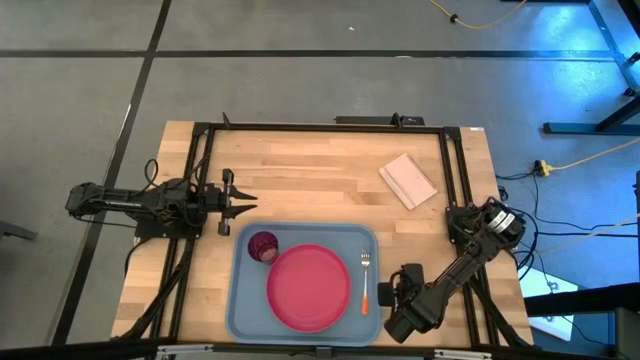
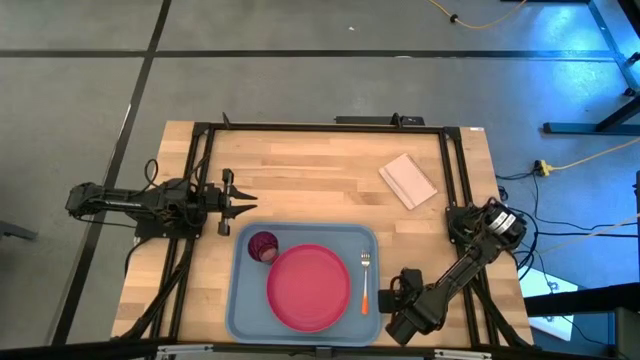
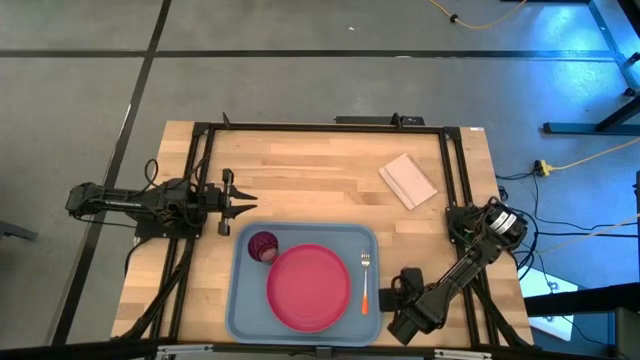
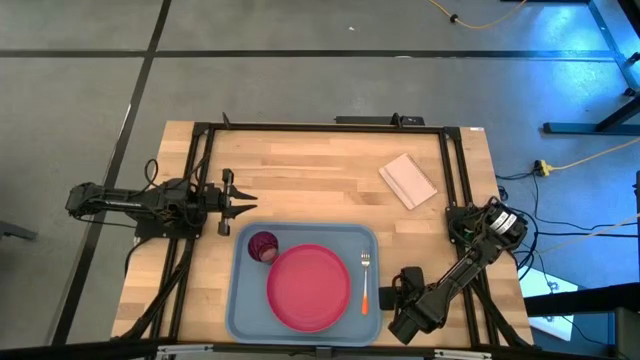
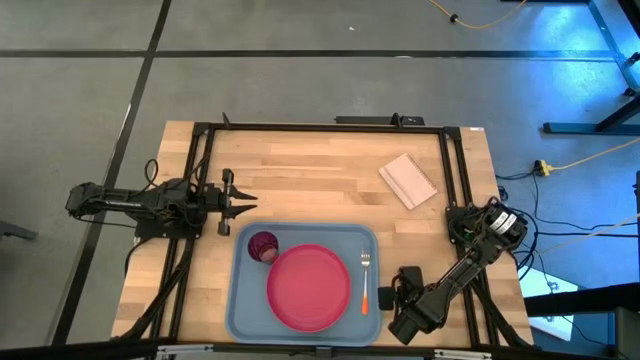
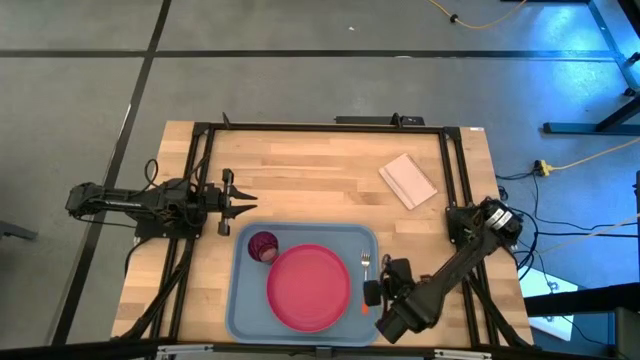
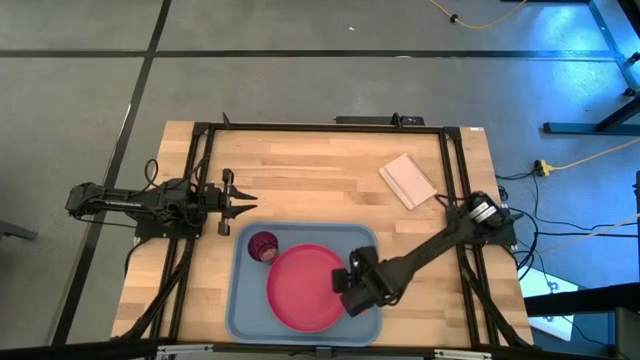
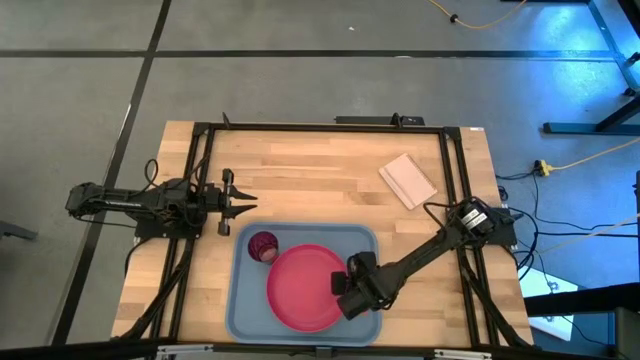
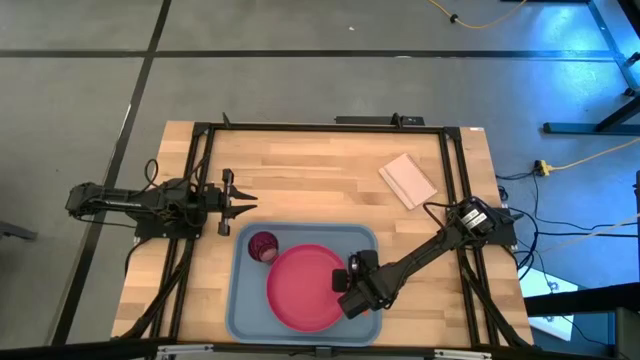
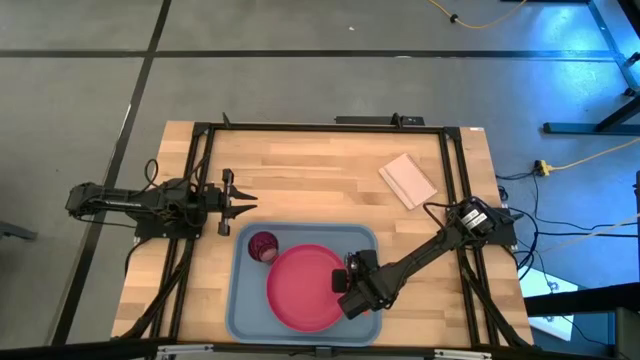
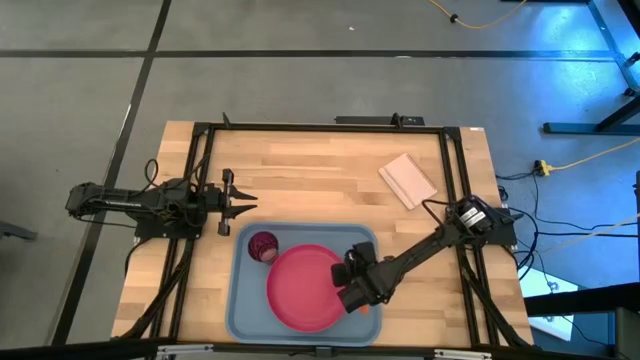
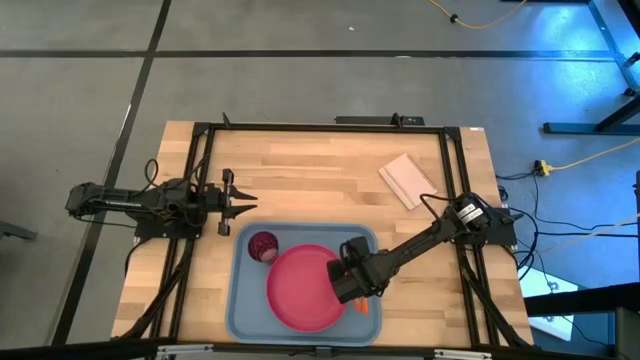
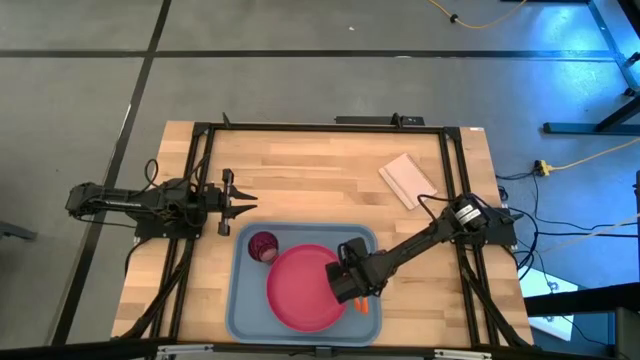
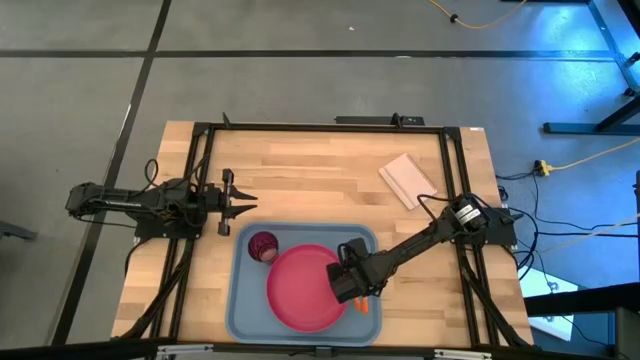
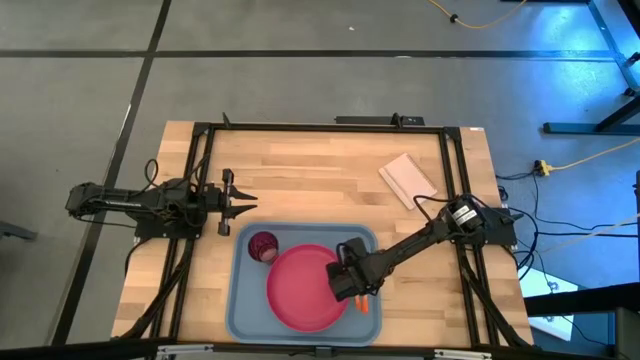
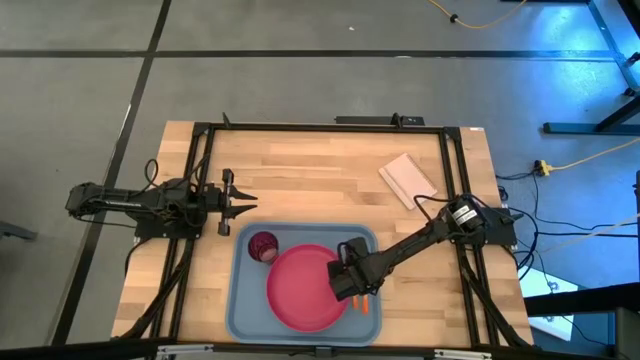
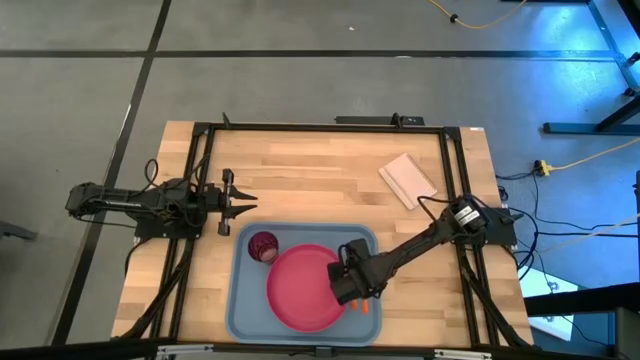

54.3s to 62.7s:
Task: Pick and place plate/cup/fork/spoon on tray
Put the orange spoon beside the pink plate on the blue tray

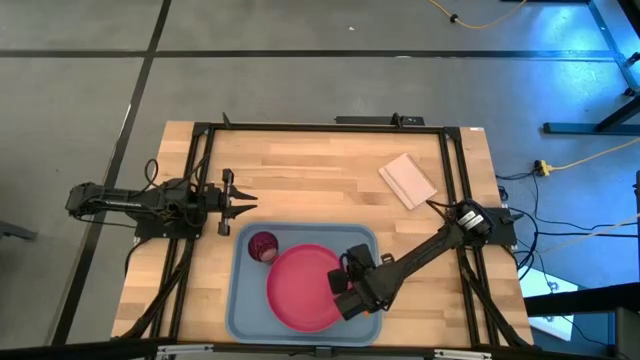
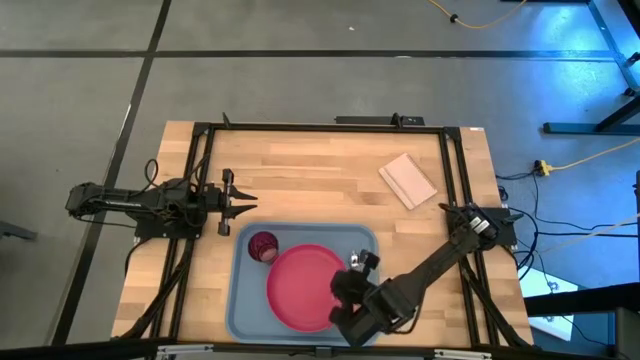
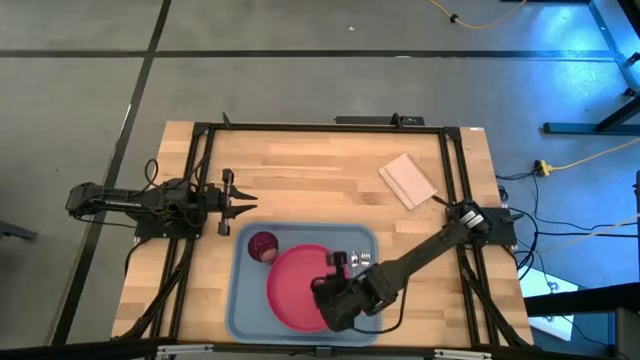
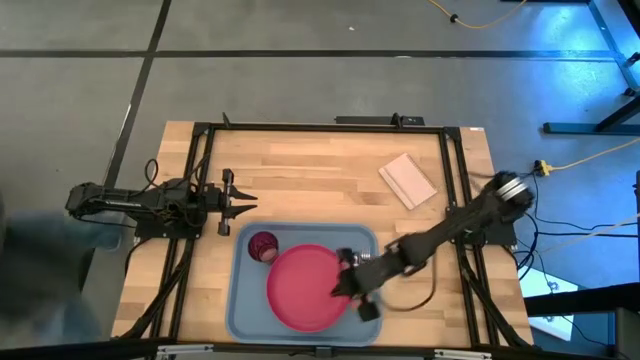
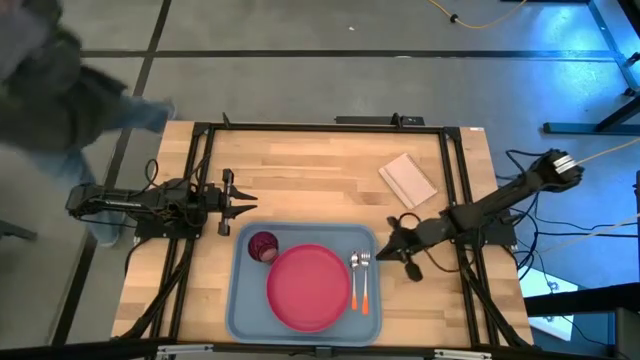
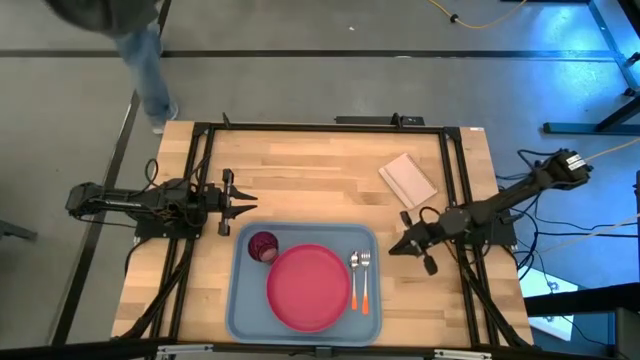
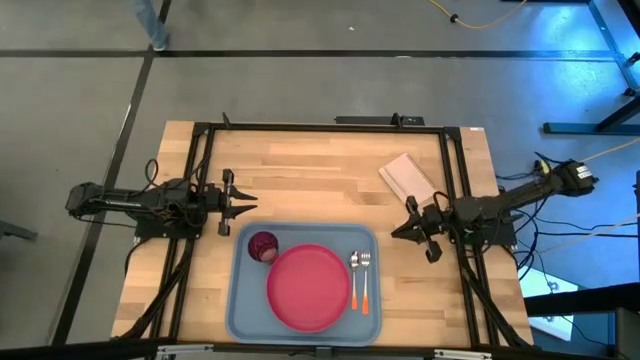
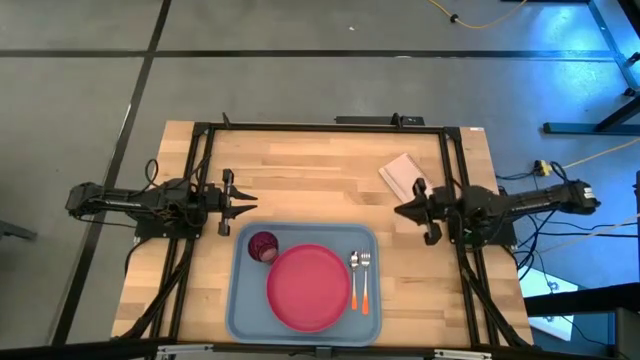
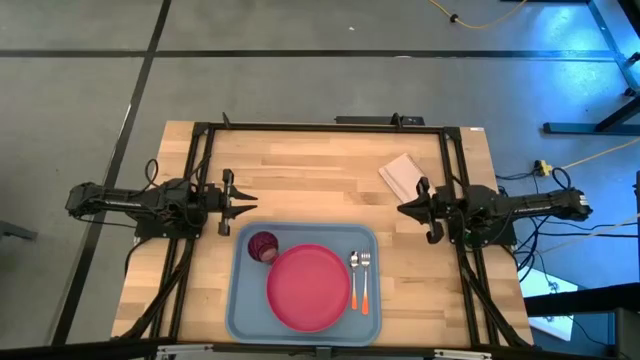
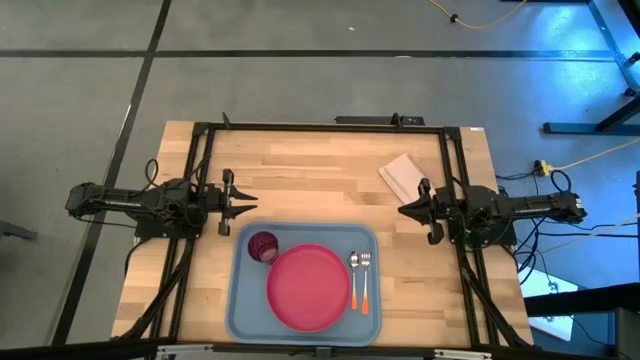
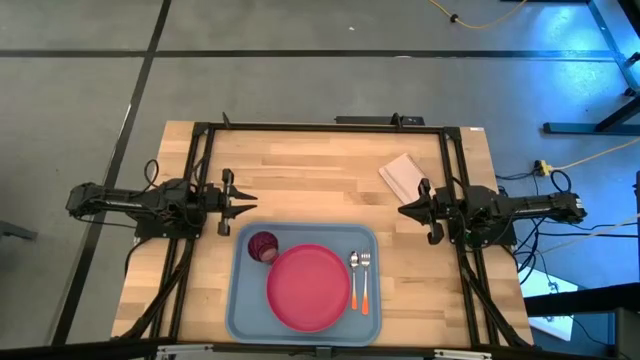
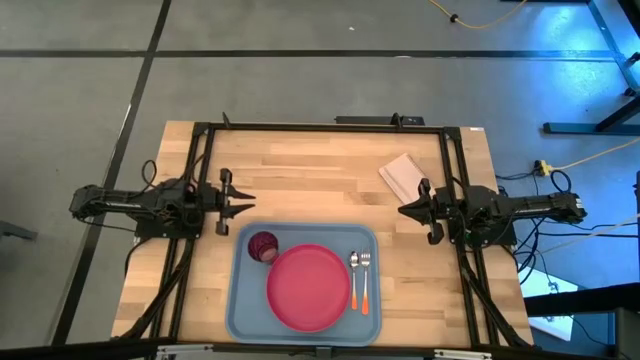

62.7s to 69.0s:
Return to Home Position
